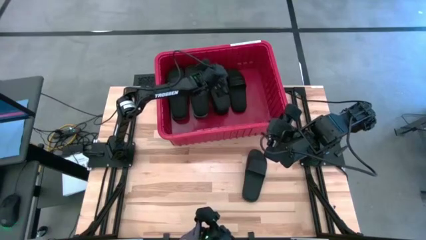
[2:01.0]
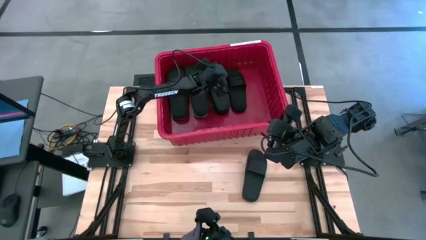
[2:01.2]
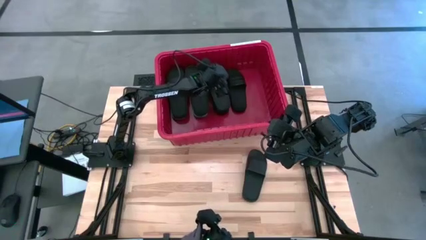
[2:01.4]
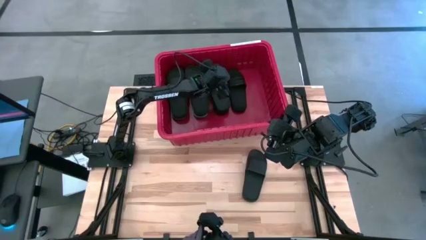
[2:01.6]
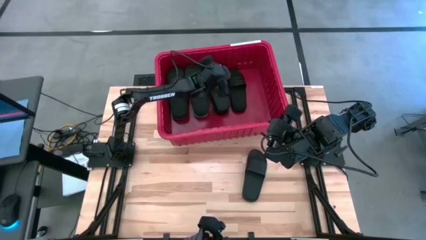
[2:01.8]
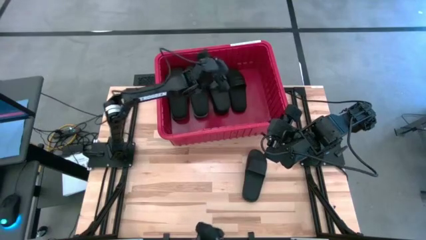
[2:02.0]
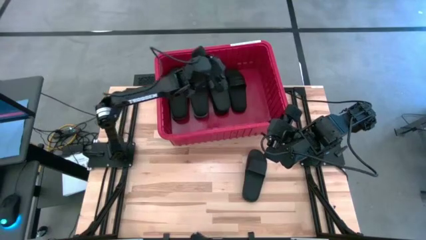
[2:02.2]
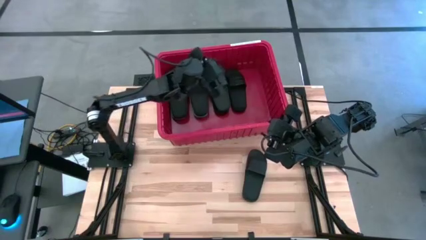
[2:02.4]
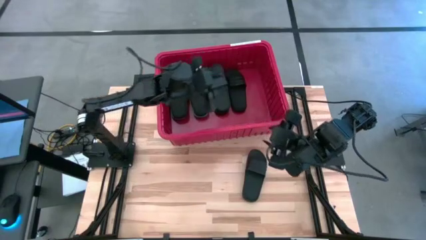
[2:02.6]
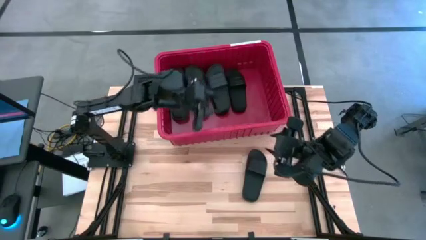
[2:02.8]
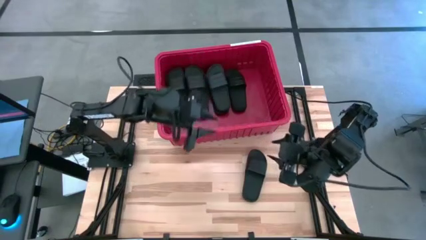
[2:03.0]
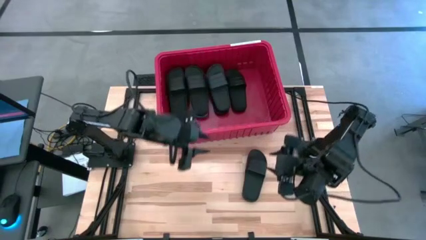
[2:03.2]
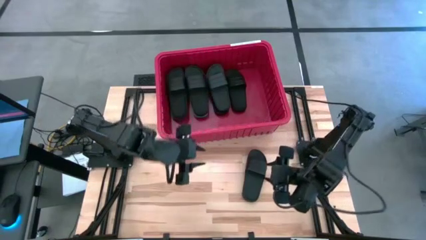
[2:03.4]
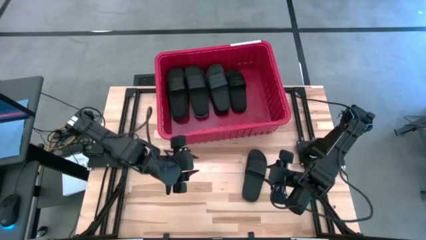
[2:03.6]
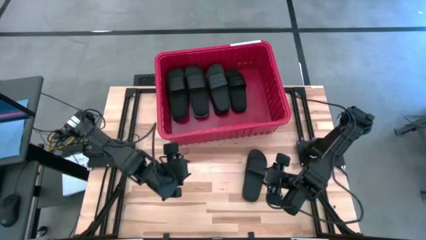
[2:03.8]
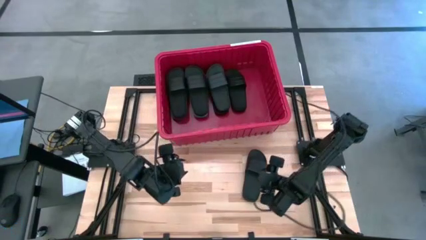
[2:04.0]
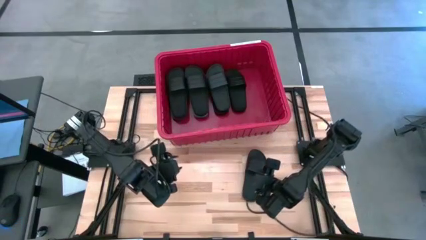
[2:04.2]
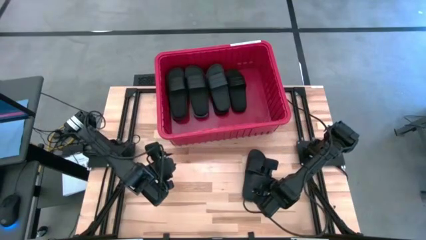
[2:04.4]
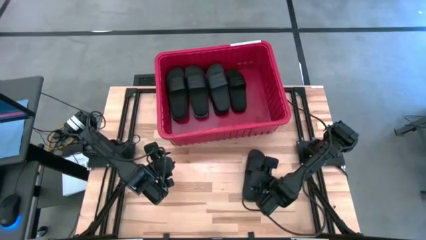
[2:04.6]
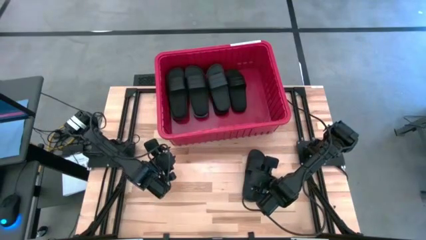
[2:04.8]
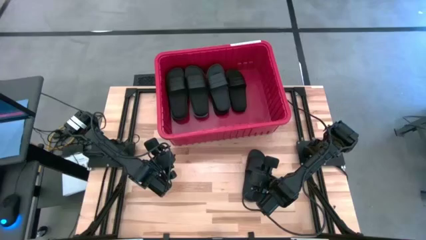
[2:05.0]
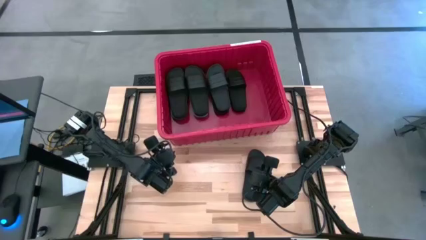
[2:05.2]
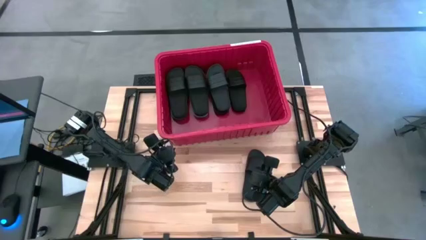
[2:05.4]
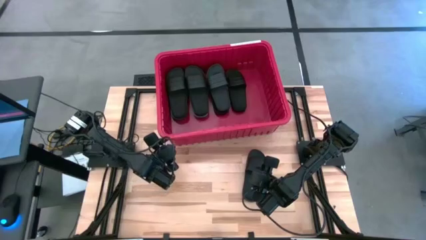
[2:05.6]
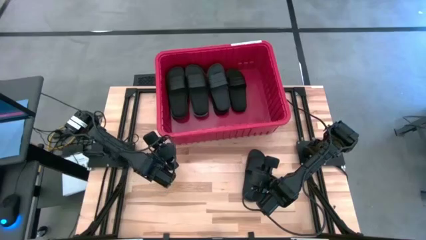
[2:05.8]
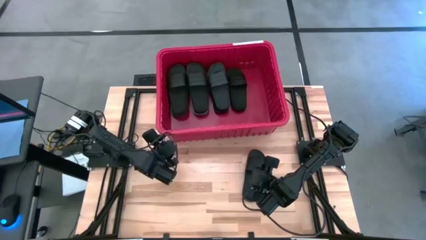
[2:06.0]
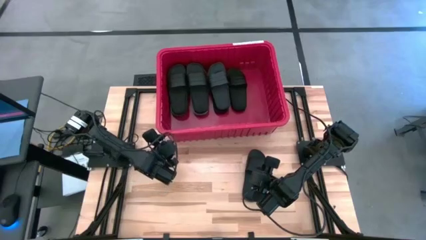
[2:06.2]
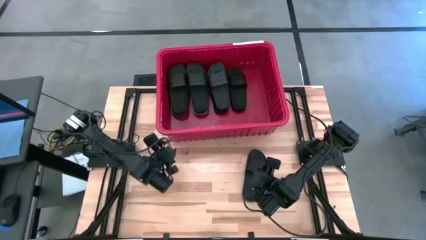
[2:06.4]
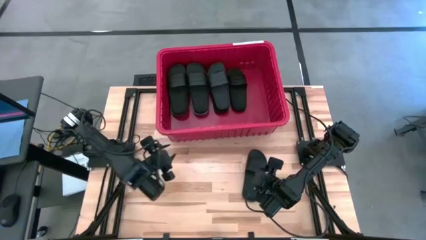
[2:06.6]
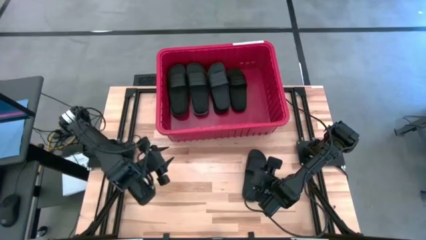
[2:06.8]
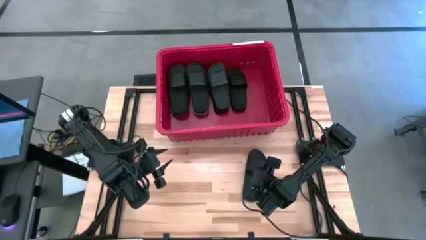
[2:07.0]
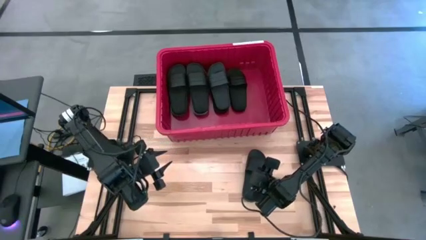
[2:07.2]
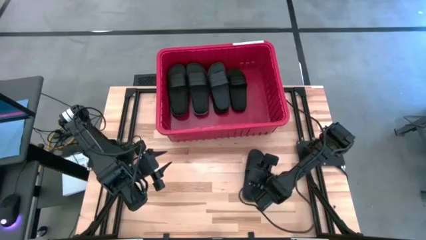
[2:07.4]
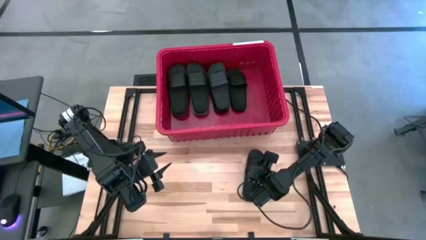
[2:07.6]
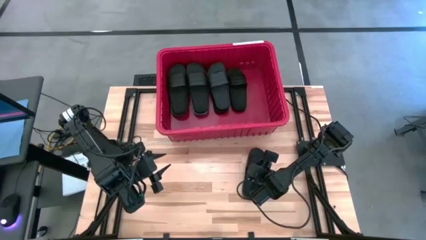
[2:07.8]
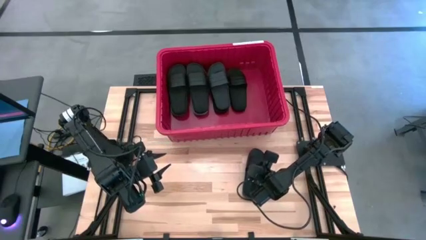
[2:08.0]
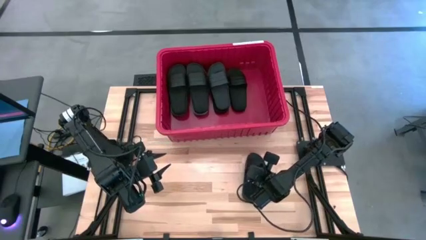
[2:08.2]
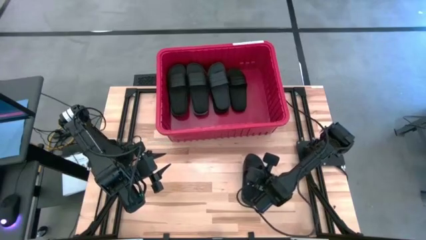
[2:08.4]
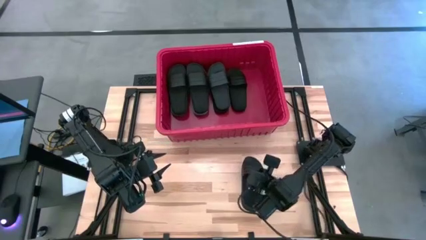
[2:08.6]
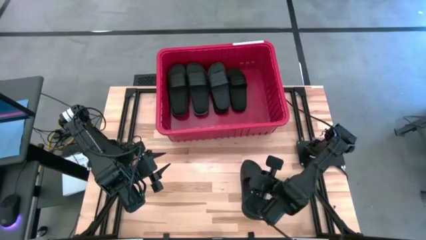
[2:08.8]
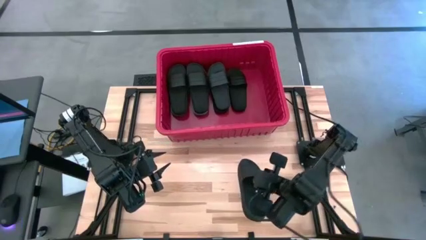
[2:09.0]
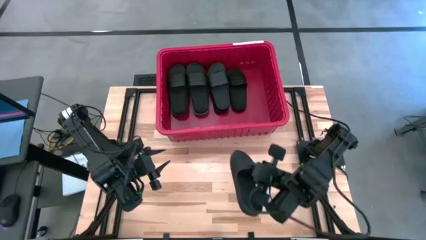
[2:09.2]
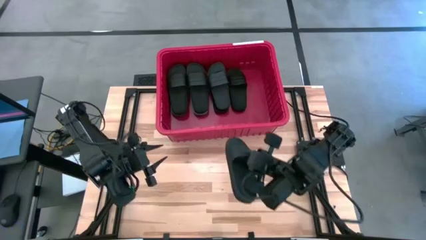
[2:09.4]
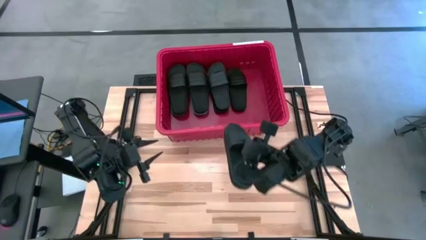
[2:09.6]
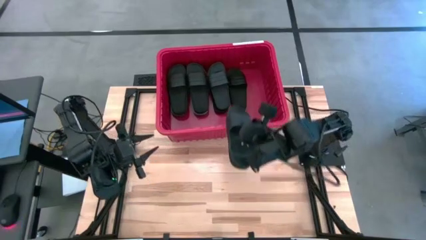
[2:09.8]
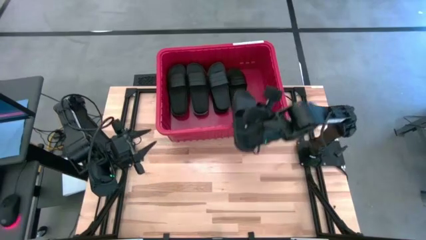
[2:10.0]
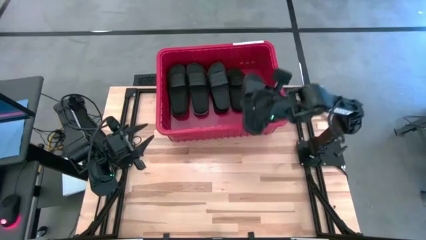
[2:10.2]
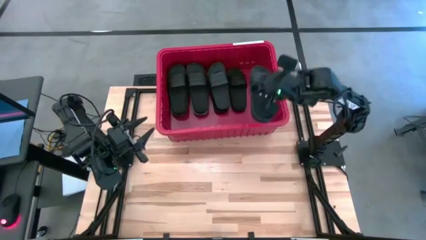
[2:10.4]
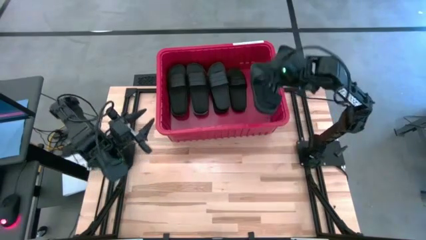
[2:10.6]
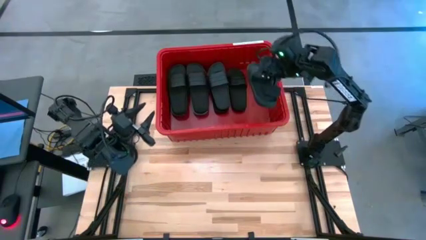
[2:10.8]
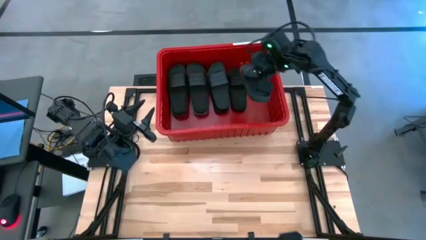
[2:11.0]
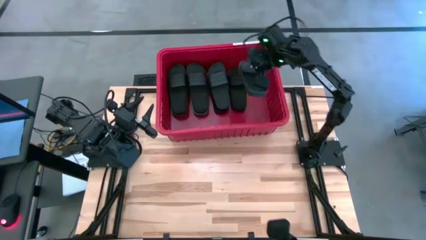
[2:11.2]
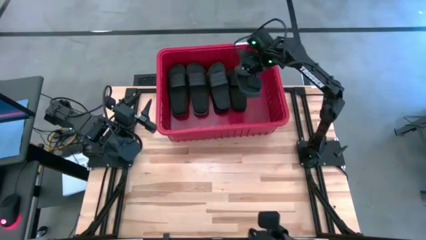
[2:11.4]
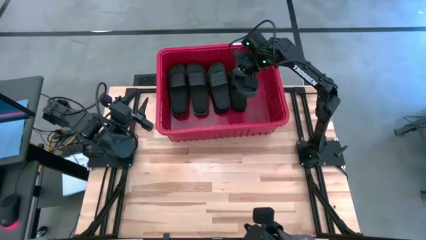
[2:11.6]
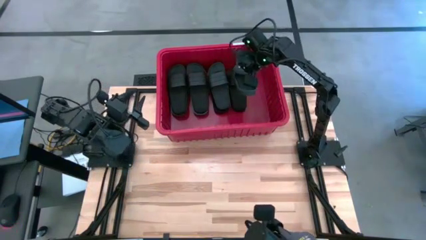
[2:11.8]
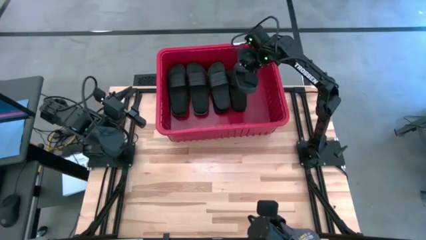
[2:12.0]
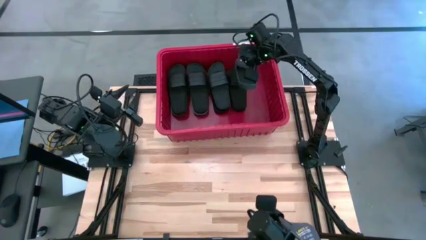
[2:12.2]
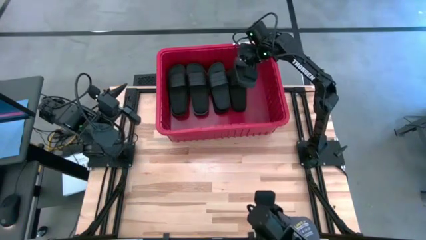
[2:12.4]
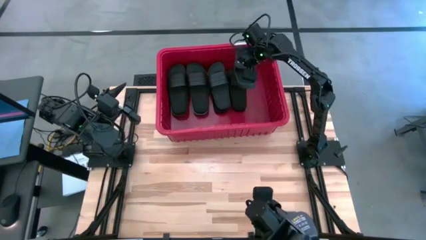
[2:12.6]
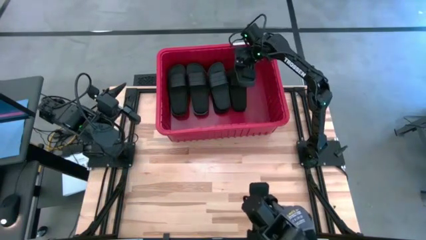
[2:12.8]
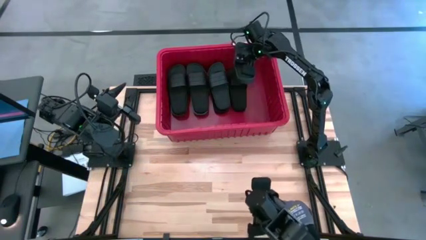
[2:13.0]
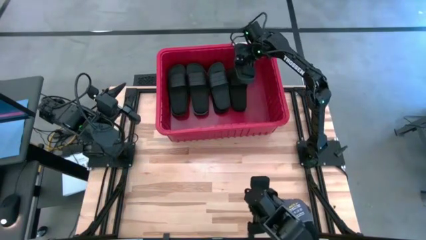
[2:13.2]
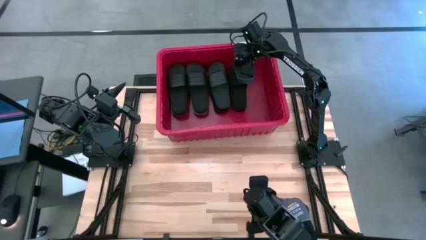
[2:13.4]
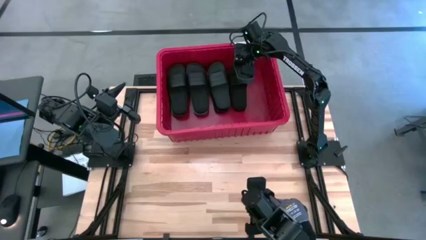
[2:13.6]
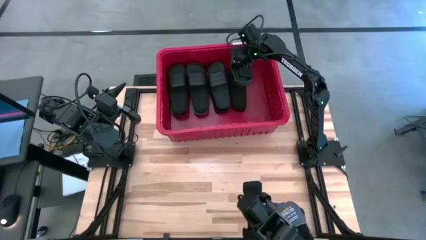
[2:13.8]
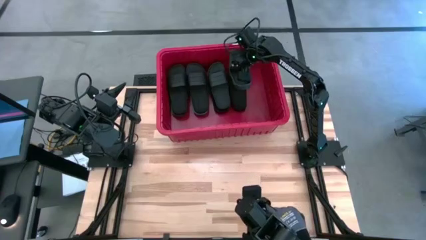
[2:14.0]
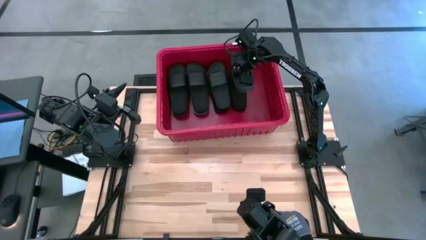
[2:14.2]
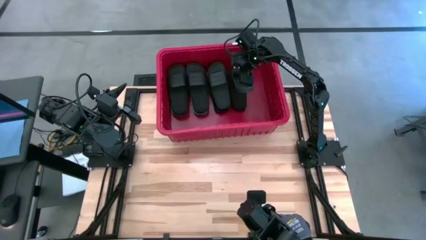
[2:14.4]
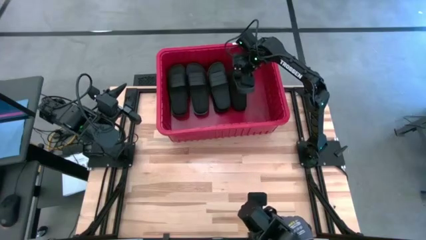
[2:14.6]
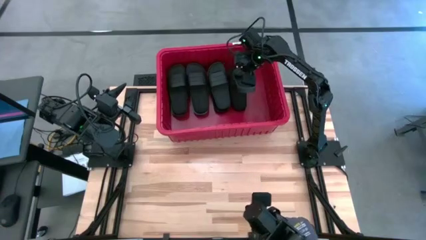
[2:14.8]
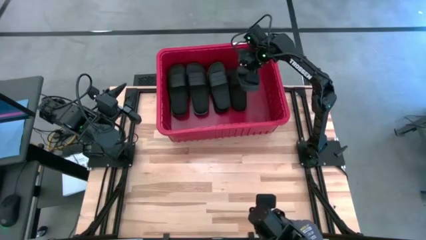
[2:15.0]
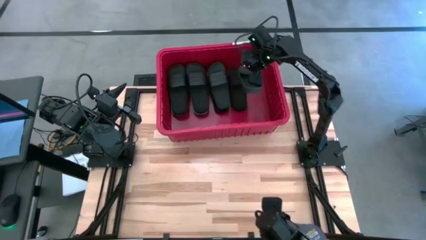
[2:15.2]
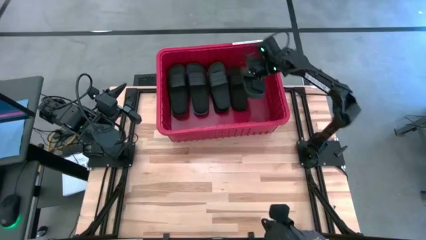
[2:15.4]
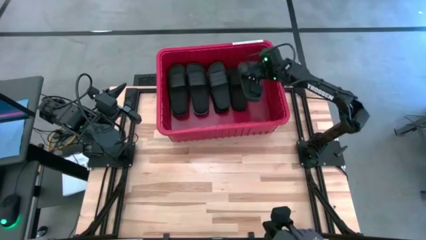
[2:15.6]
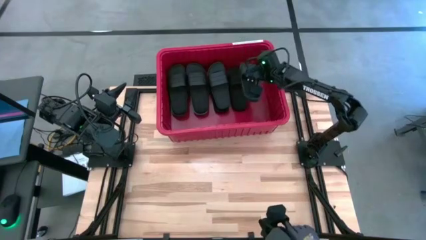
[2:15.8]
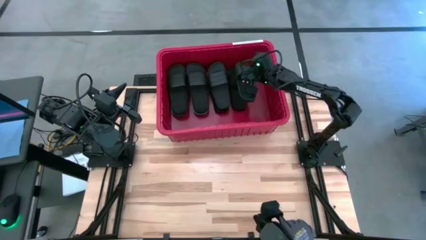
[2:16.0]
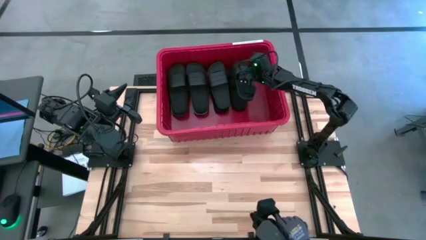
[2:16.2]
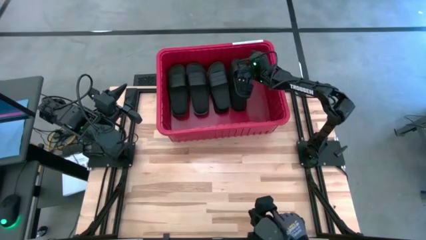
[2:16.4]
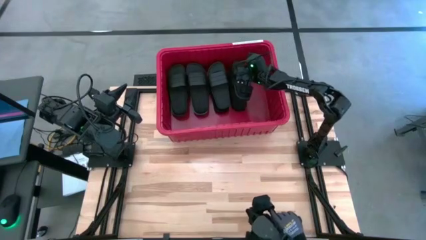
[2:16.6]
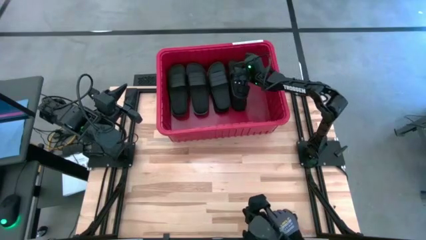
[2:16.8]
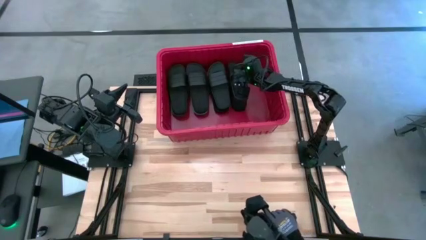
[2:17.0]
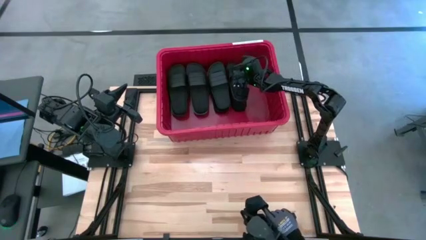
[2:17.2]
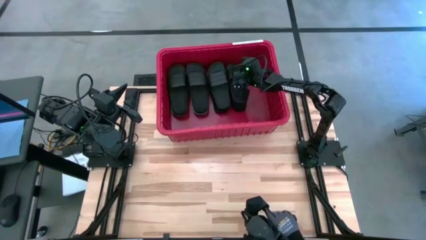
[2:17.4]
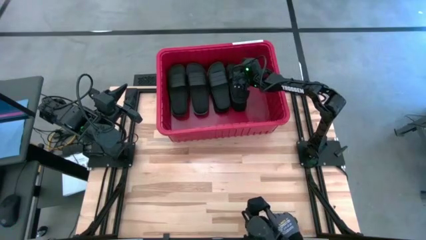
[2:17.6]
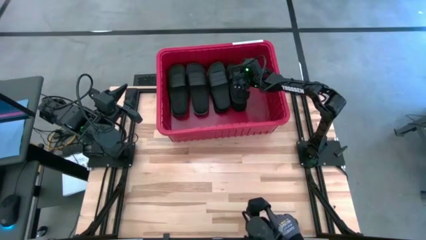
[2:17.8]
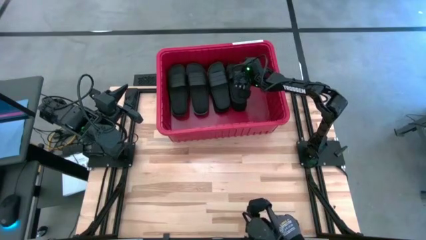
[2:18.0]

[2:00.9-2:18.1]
Task: Pick and place slides into bin
Put the black slipper into the red container
